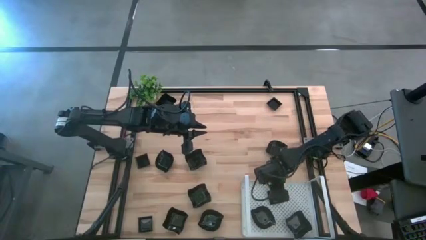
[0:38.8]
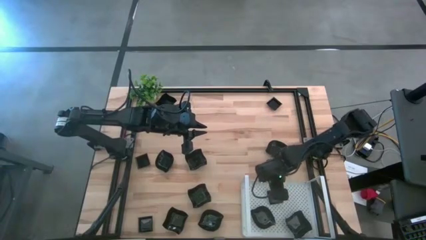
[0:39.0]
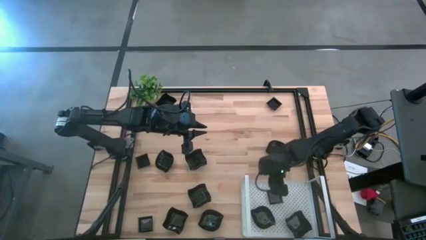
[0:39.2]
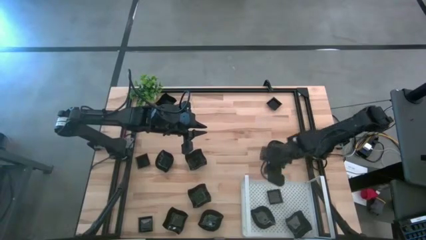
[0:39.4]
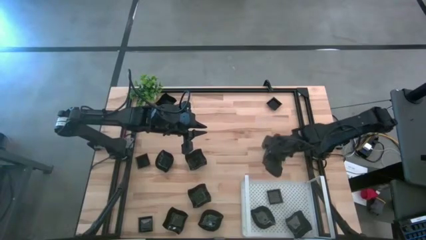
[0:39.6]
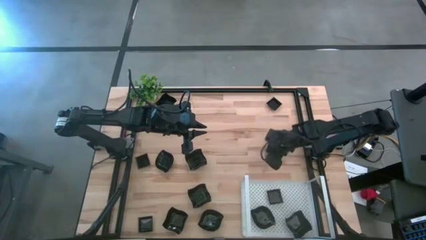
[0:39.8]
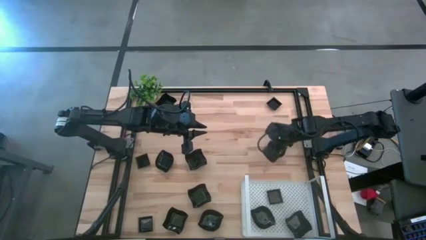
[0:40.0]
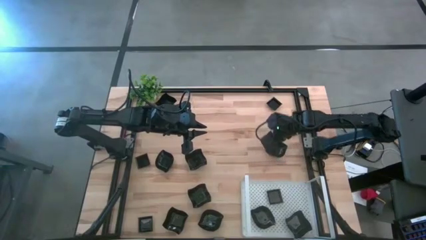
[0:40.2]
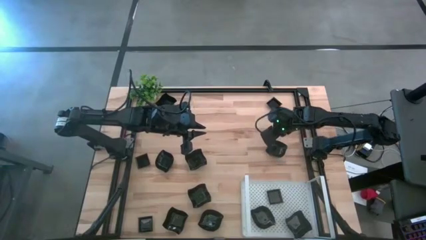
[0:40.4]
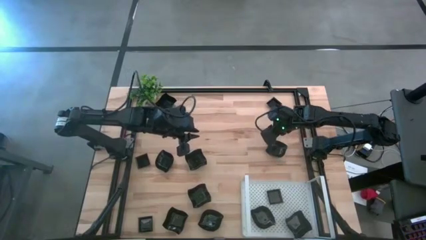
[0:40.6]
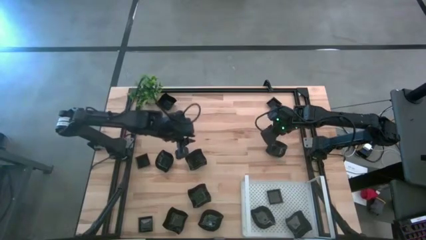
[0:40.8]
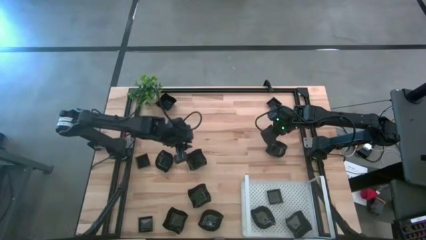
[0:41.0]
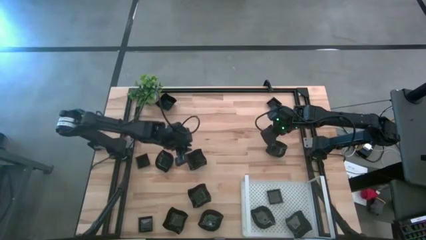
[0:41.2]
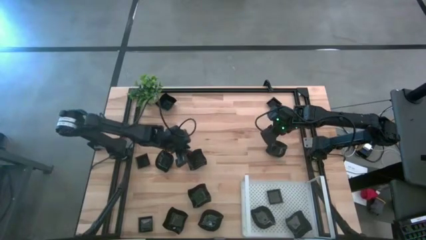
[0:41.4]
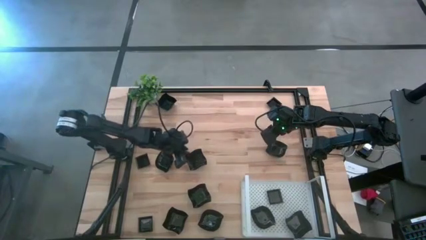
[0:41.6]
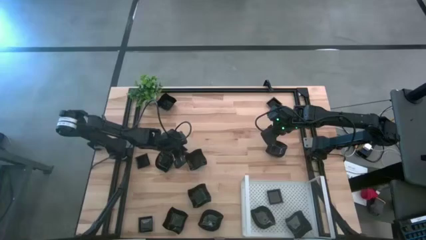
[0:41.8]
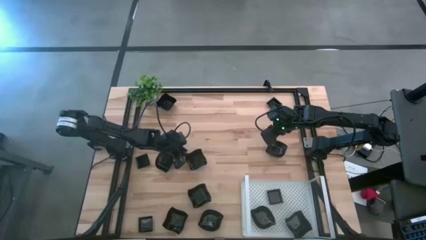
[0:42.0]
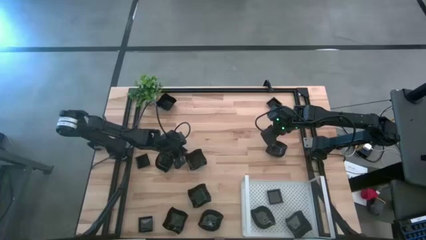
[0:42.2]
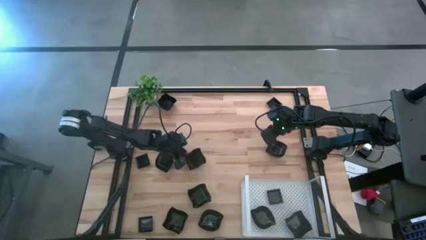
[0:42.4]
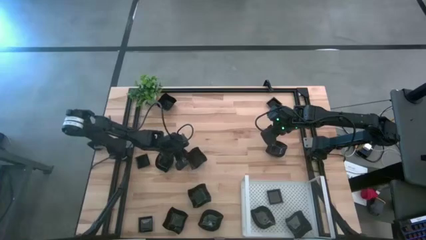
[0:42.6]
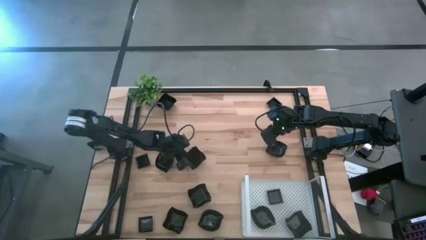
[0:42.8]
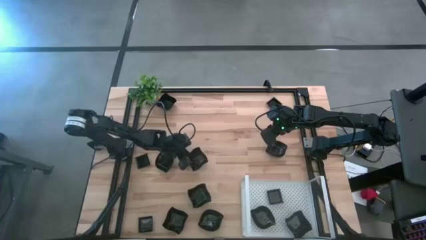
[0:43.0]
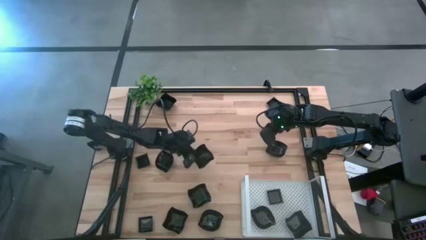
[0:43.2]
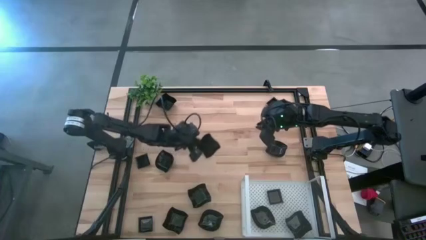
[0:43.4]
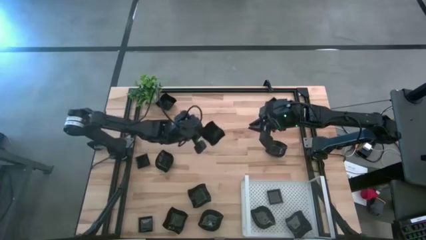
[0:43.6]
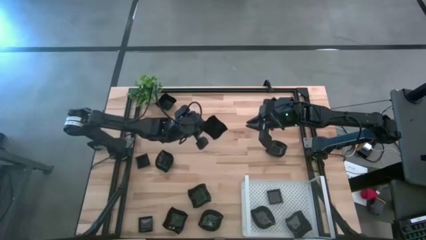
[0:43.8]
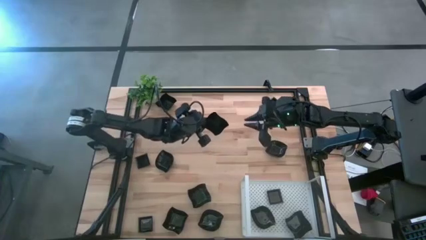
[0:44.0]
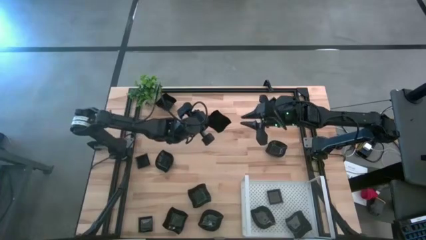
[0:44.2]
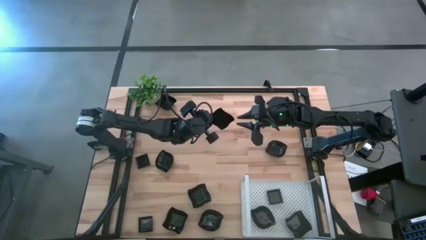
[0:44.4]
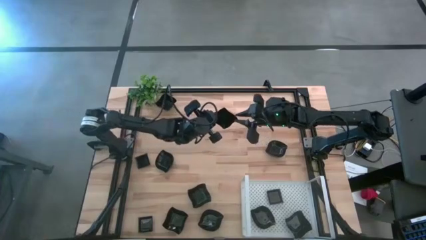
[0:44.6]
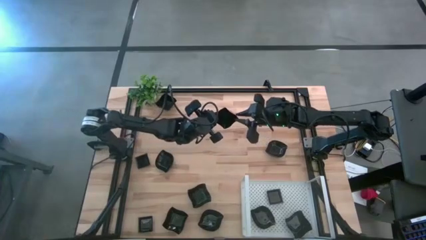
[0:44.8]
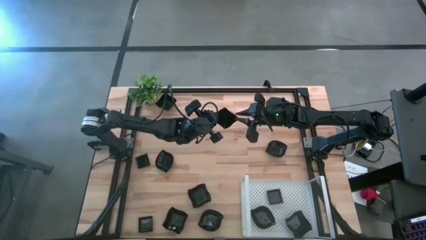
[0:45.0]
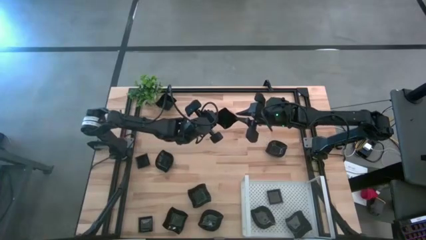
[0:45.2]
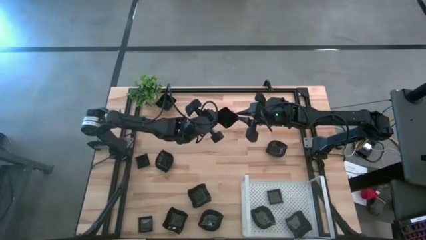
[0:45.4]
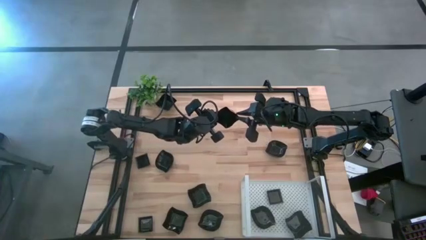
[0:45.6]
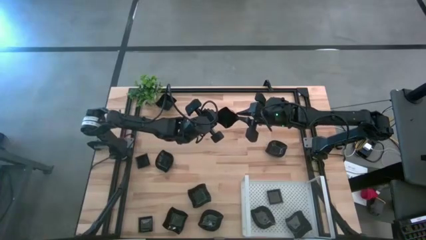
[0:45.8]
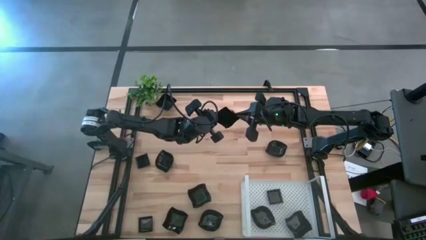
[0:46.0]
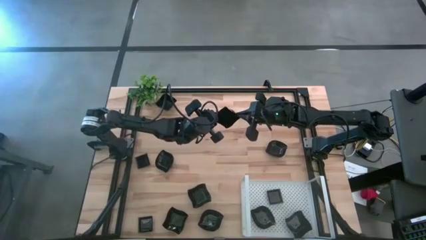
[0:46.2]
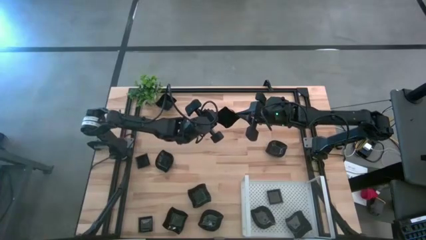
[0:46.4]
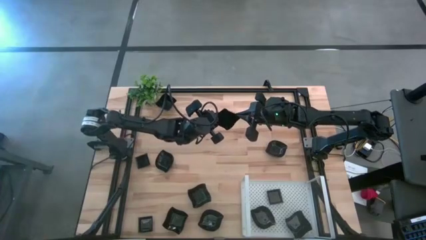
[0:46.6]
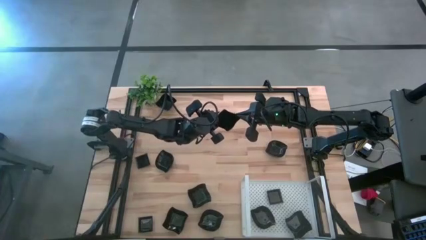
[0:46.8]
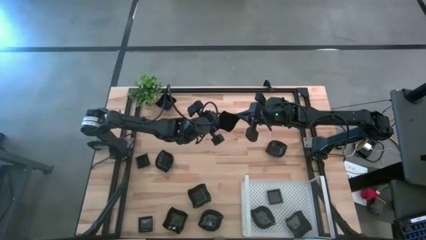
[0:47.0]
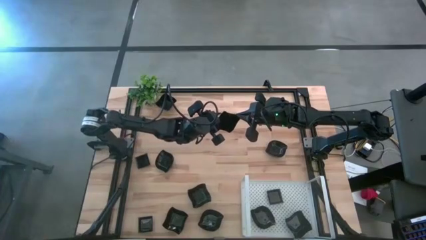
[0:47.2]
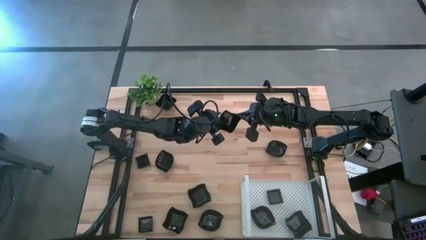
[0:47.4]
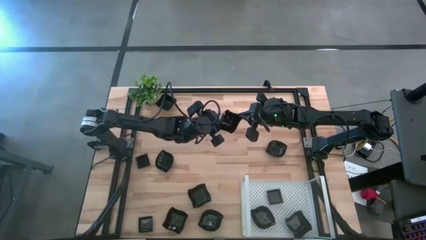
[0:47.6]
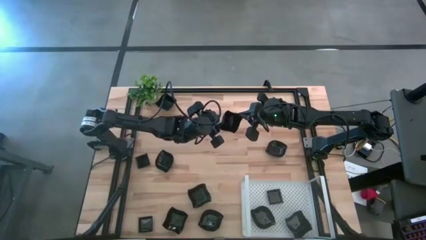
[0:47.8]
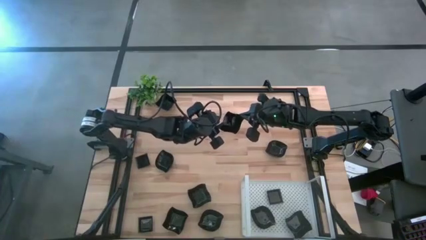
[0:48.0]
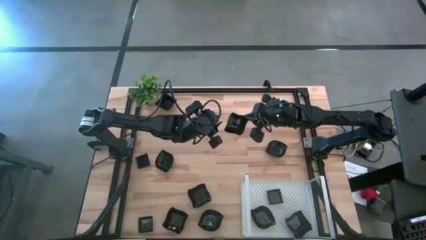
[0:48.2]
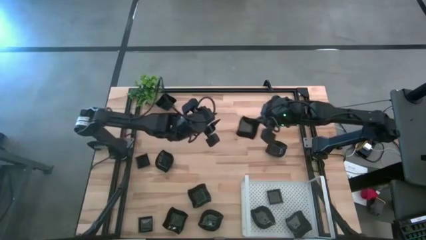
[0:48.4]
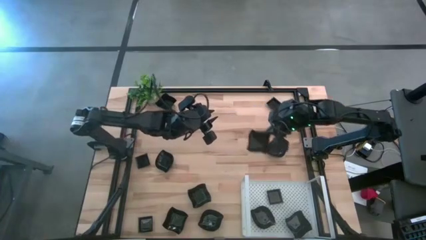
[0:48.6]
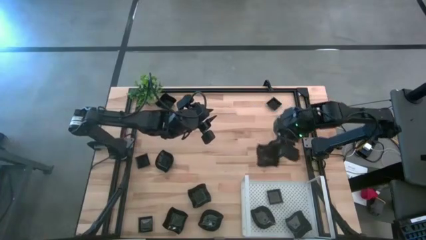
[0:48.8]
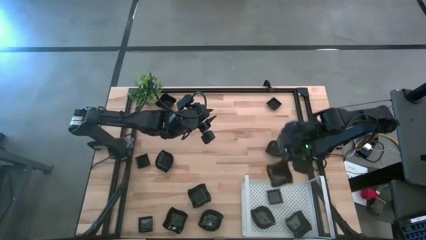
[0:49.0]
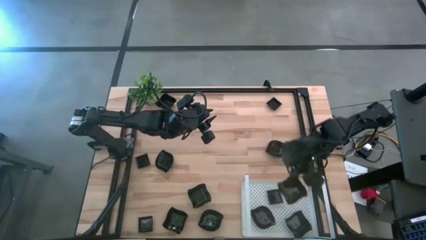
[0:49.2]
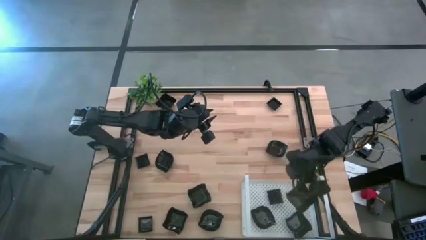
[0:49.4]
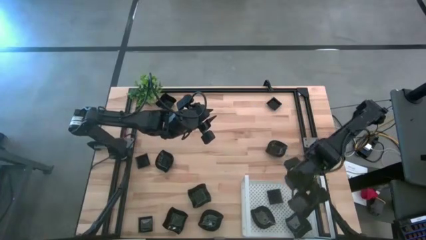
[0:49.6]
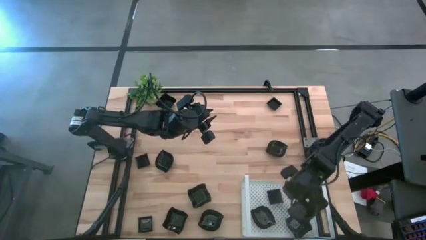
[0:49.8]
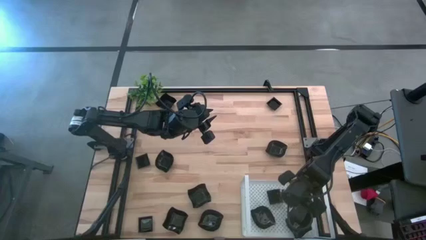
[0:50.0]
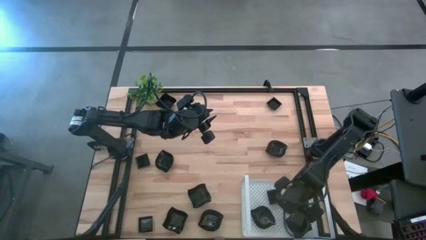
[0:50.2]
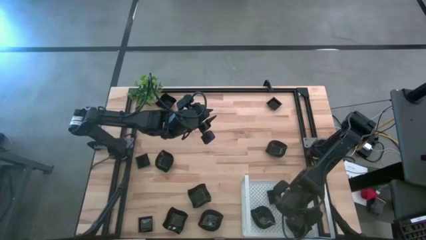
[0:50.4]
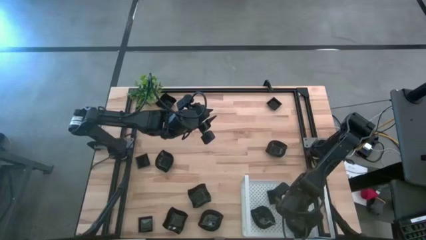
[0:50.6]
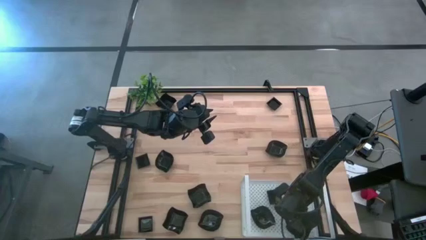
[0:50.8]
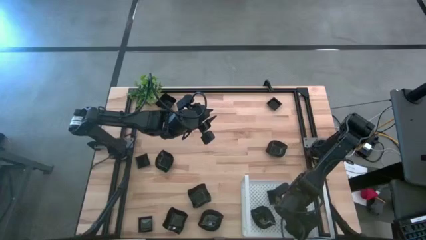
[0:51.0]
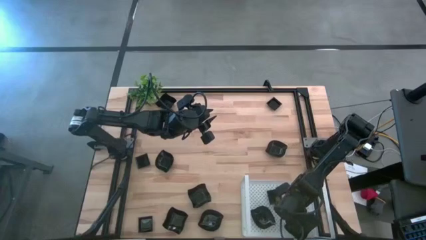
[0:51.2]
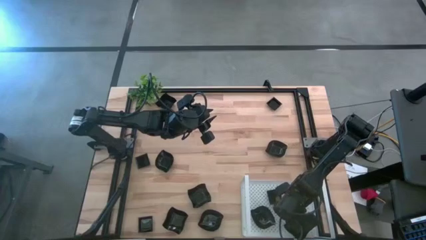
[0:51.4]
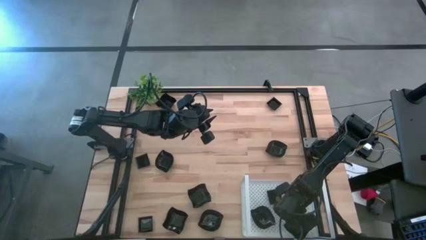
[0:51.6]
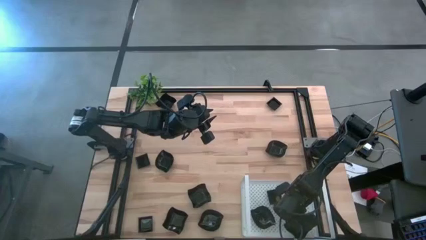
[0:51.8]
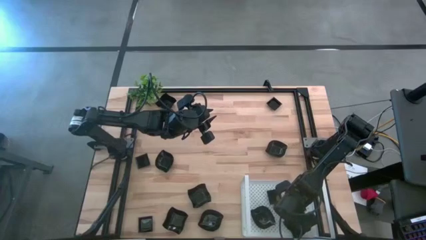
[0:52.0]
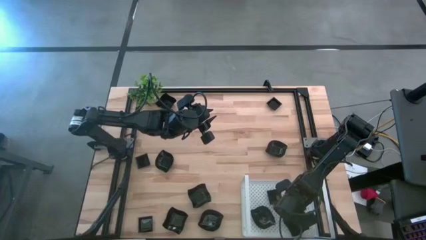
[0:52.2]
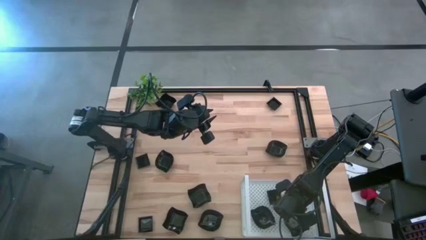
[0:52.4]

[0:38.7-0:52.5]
Task: Pick & Place Mini shaped plates
Stack the distorted square plate on top of the other distorted square plate on the shelf
